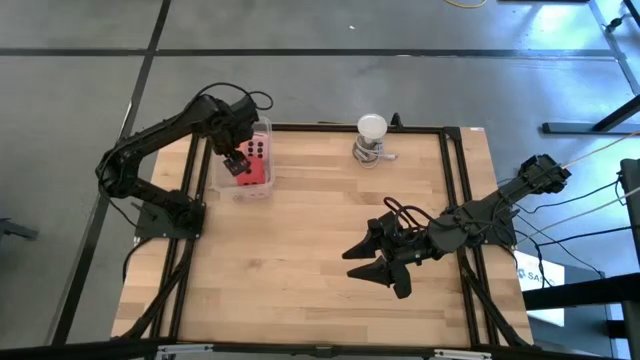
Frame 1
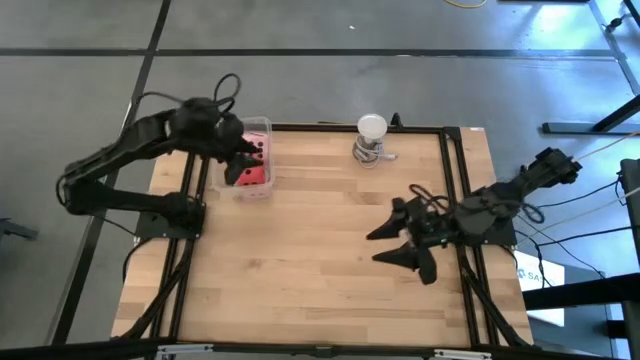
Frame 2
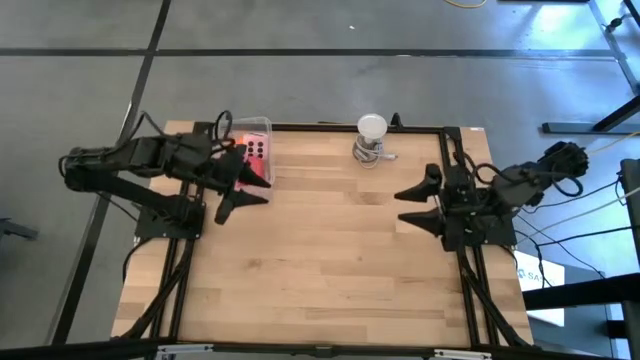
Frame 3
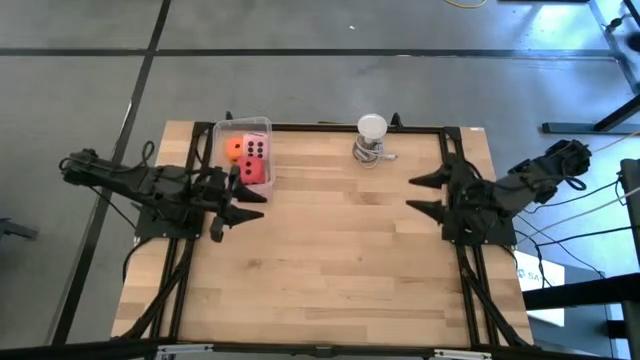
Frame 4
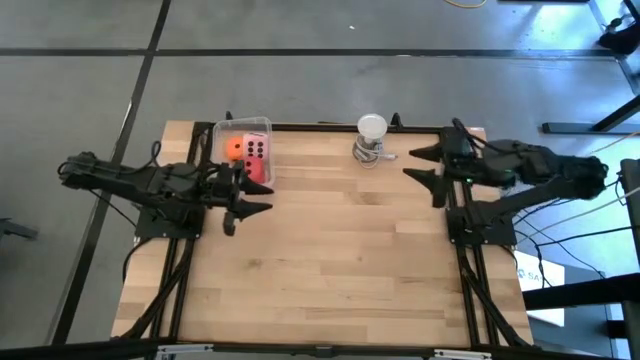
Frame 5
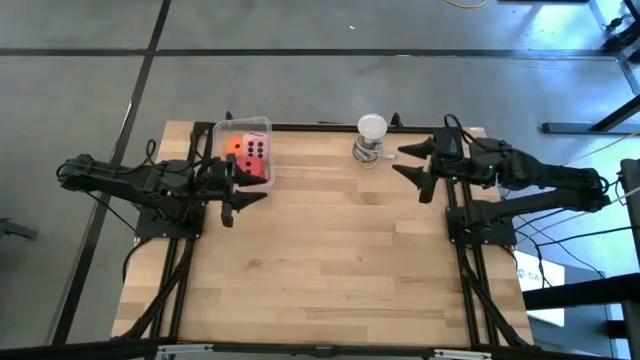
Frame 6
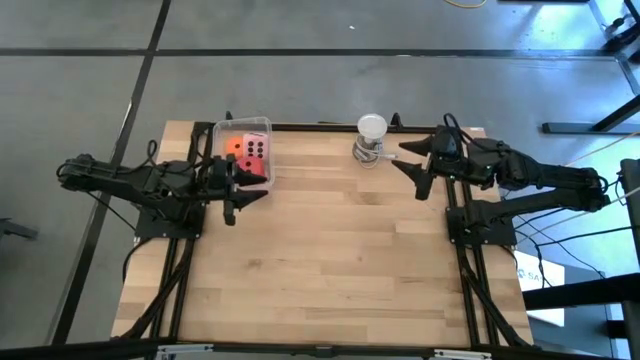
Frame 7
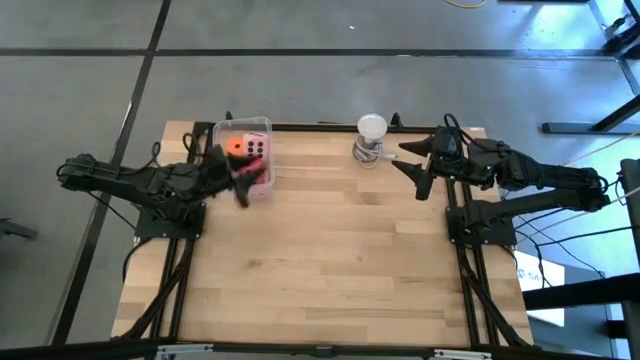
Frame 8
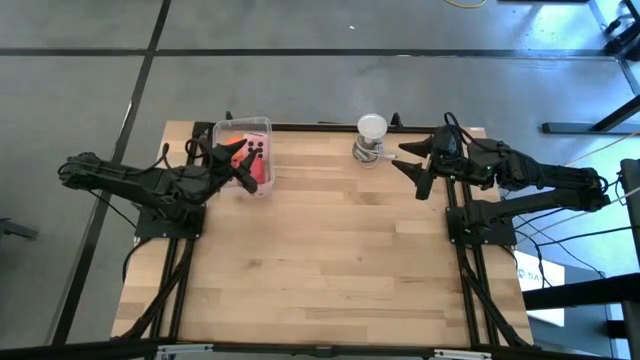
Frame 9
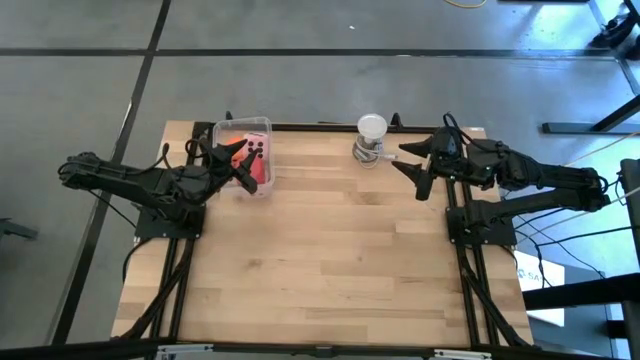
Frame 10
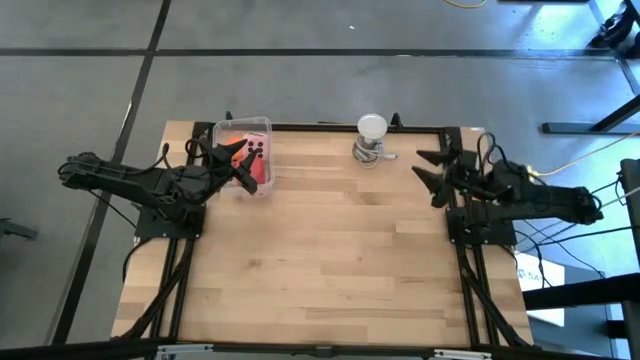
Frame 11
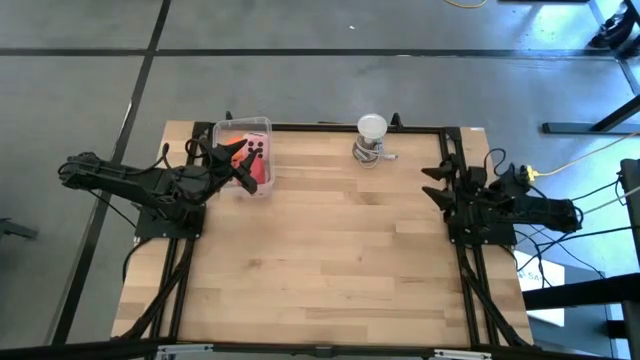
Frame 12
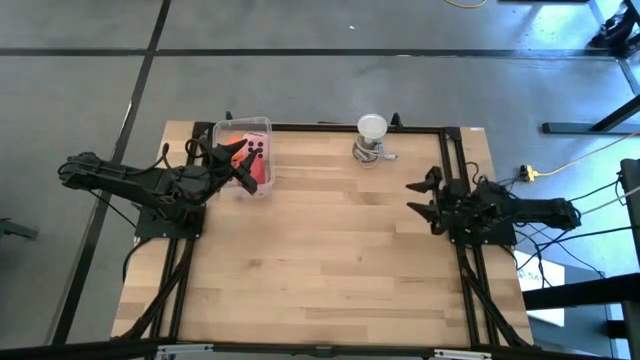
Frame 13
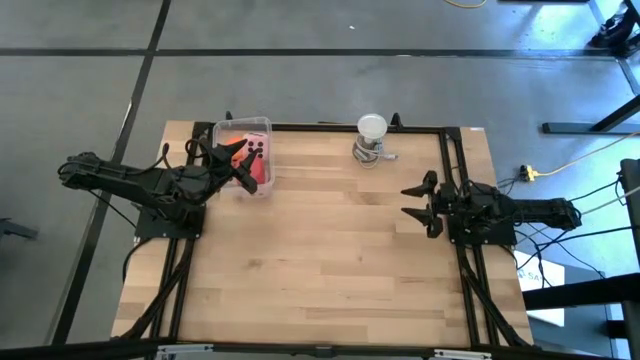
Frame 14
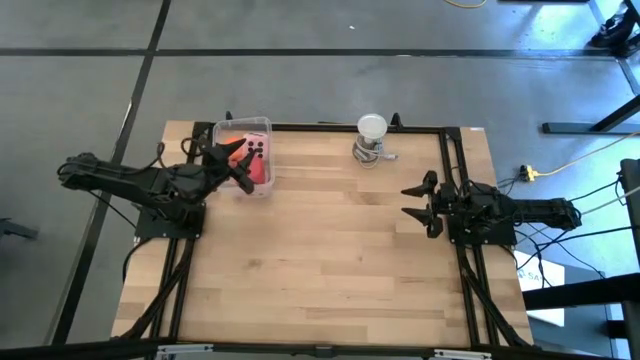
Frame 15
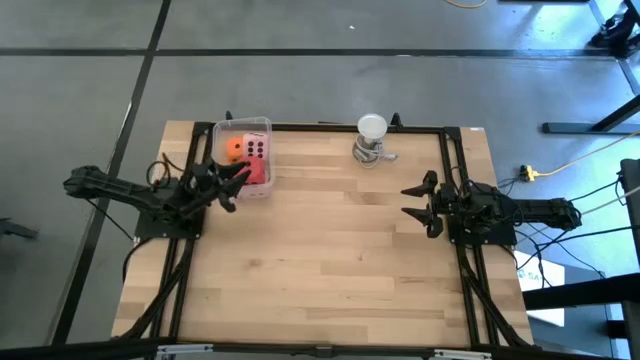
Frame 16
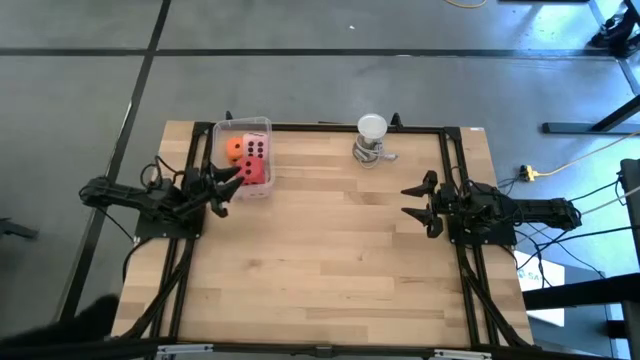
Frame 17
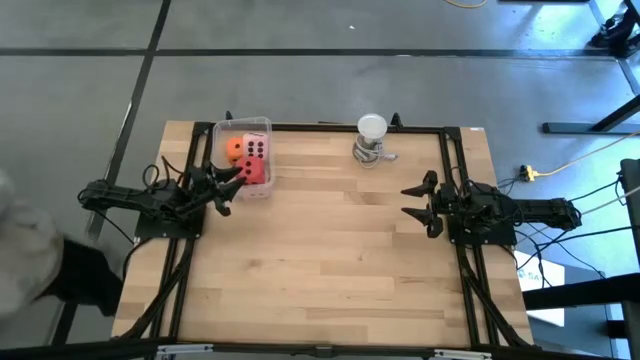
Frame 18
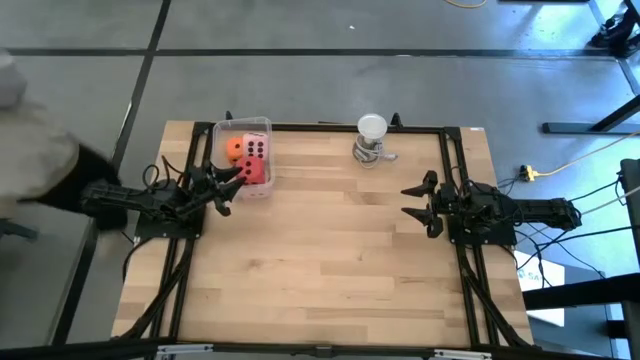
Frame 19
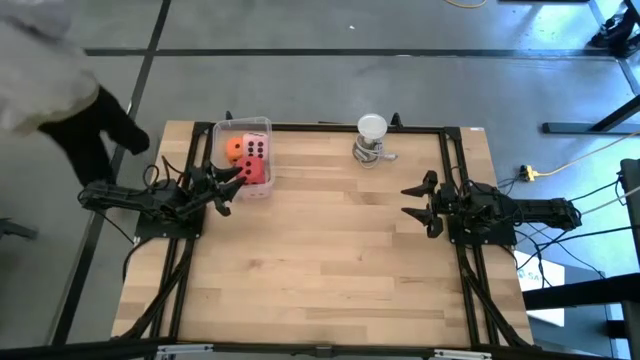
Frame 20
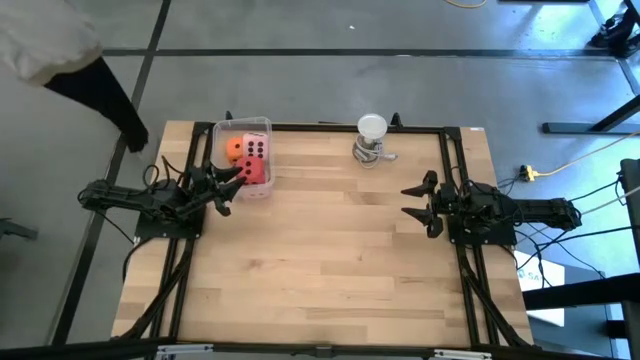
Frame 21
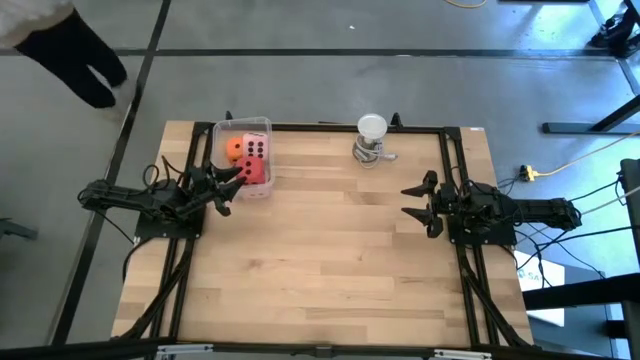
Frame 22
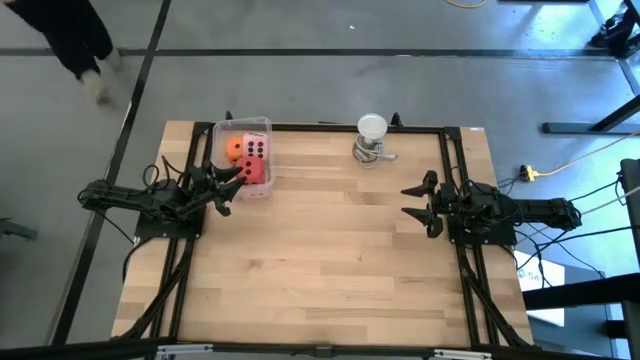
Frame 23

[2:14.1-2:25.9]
Task: Pick & Place Dice
Return to Home Position

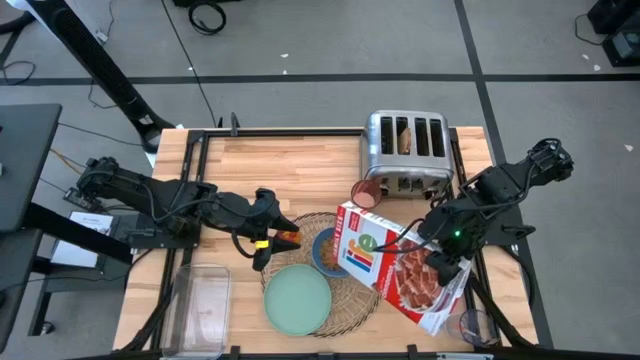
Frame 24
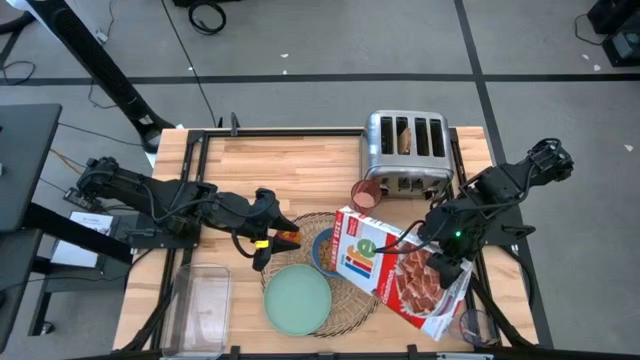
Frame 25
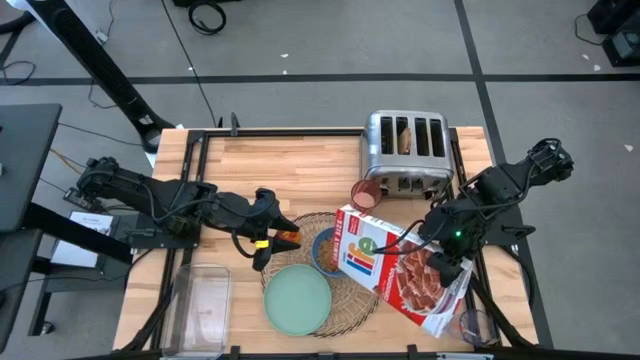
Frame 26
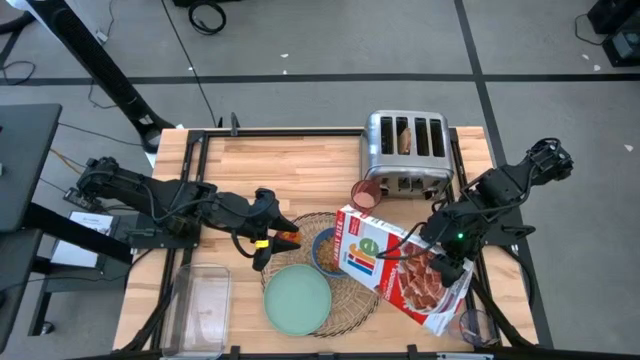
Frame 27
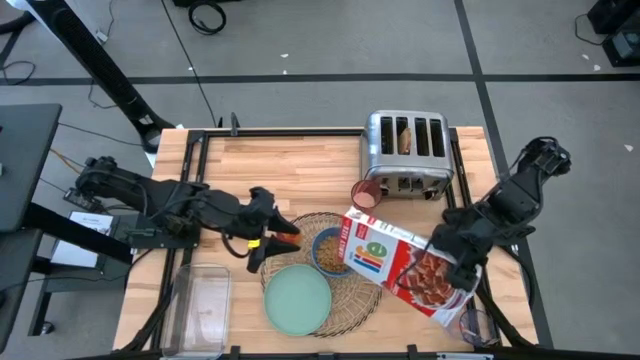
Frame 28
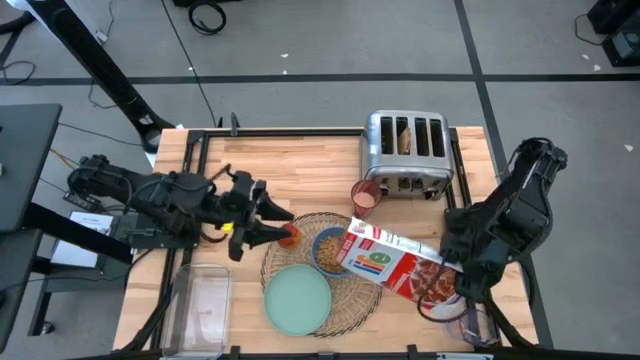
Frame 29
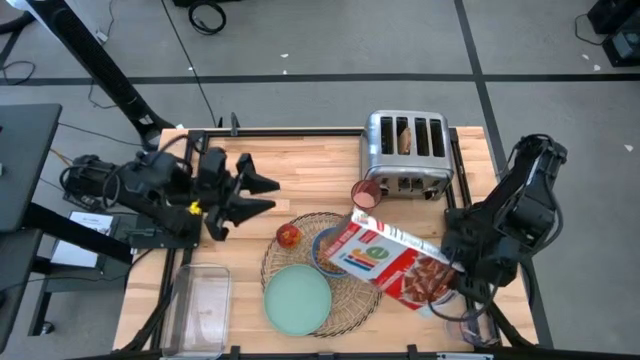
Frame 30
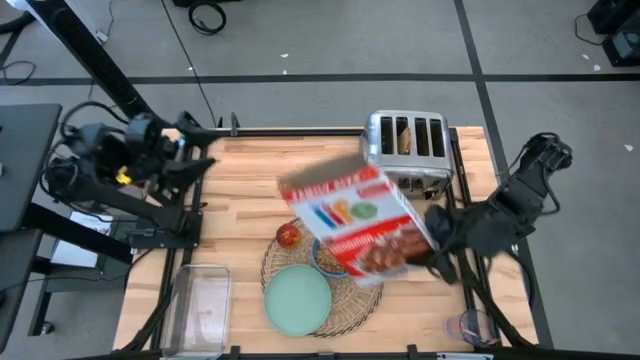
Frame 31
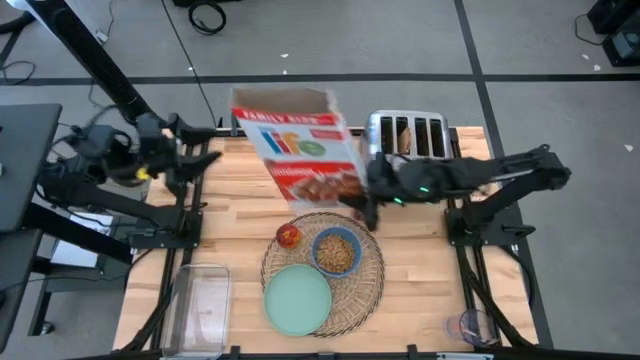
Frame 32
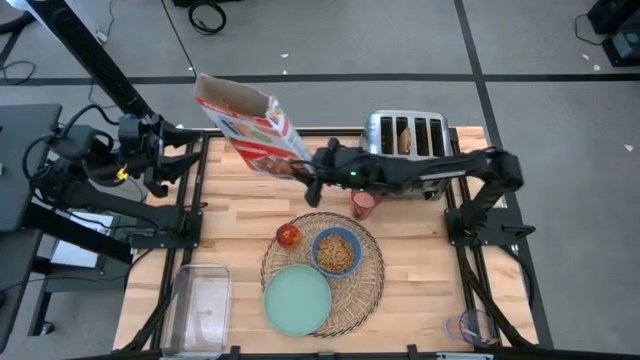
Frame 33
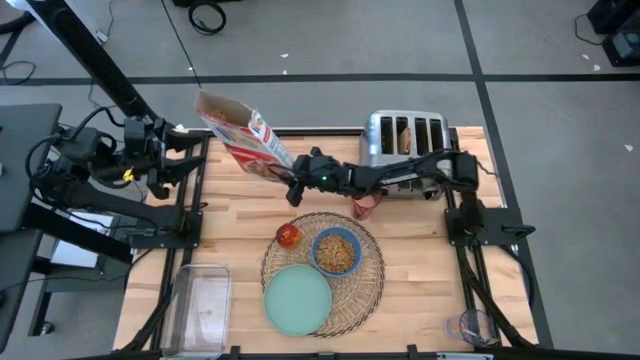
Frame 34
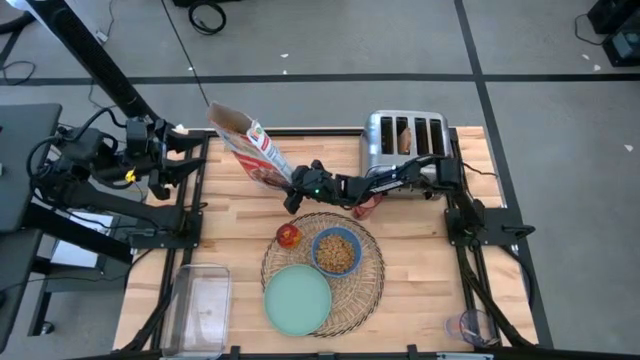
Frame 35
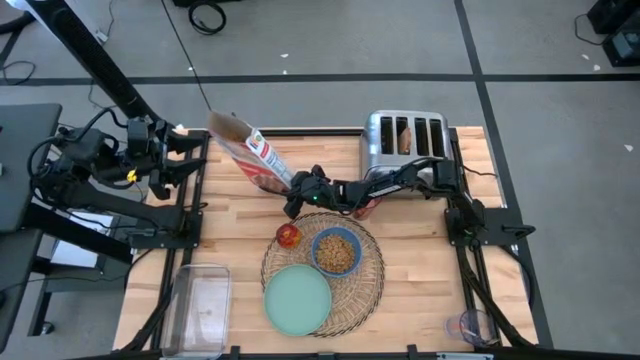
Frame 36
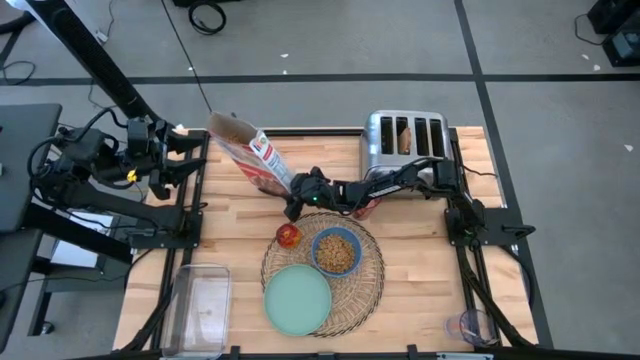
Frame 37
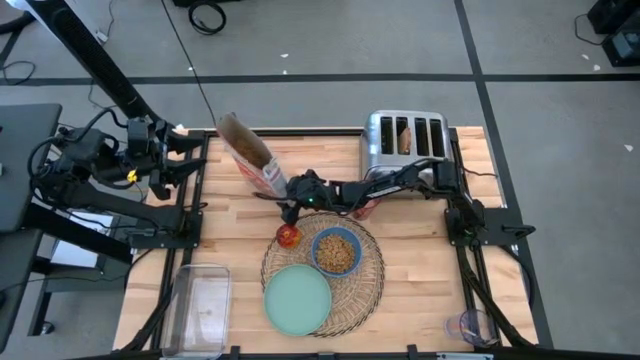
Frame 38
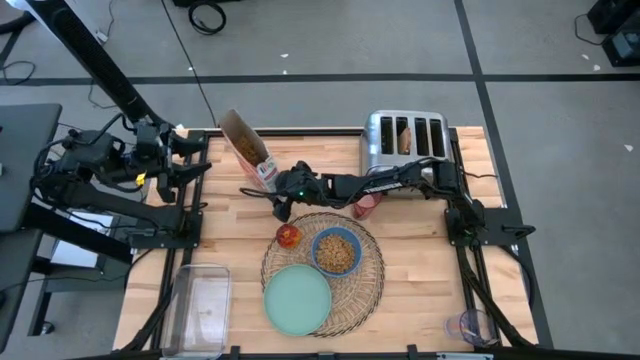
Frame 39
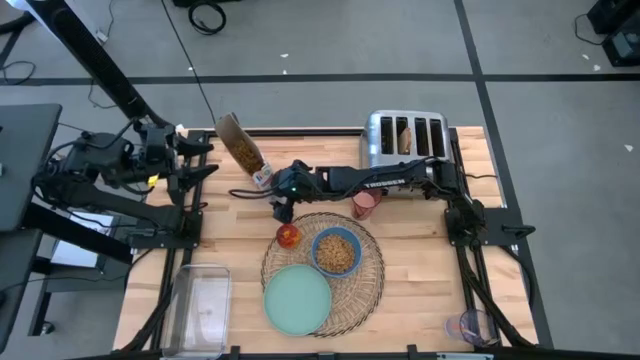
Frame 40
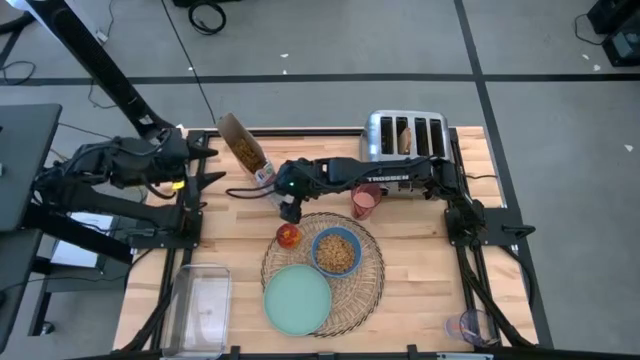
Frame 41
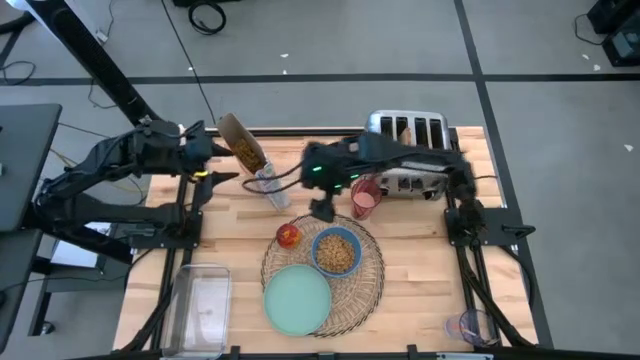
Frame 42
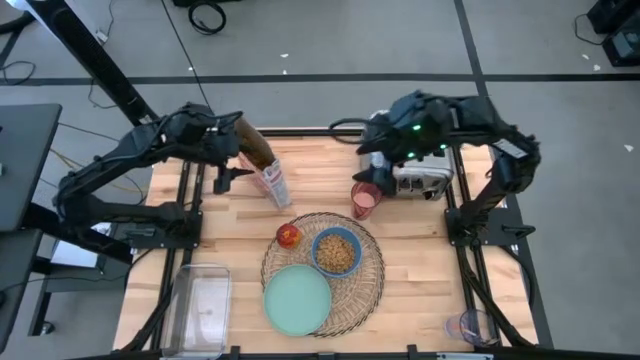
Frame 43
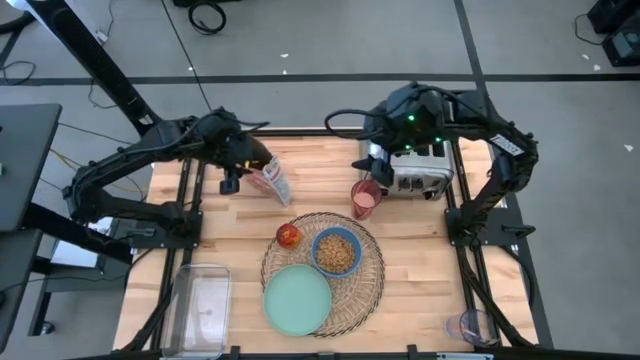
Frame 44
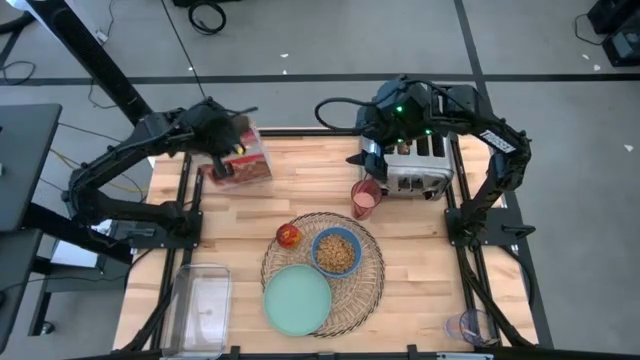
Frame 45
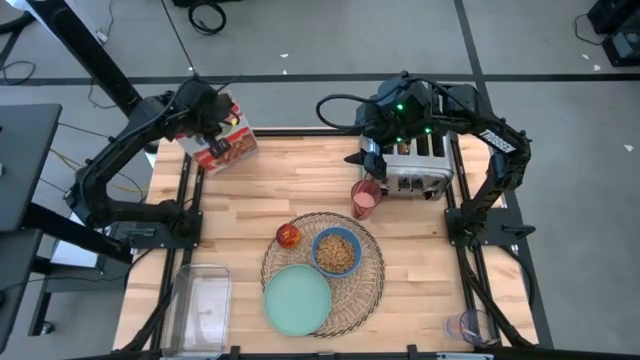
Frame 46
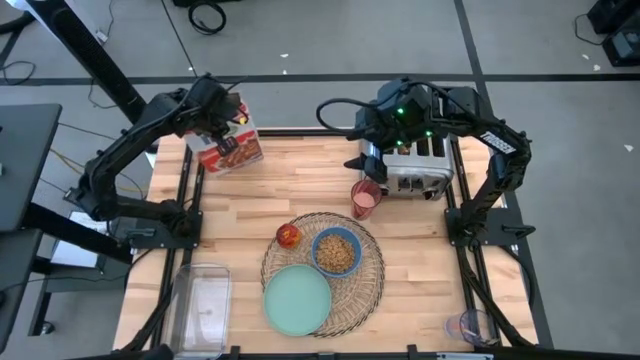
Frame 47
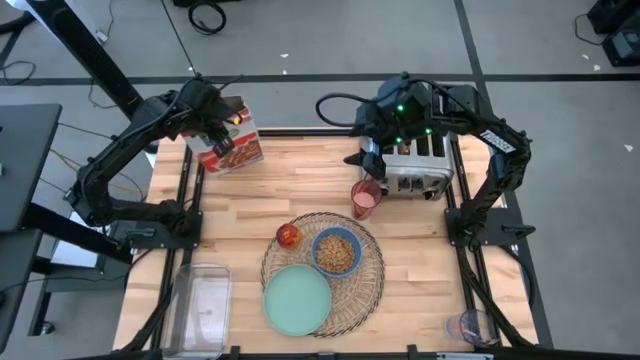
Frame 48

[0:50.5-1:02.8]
Task: Arrange a breakfast setting
Pour the cereal from the cereal box into the blue bowl
